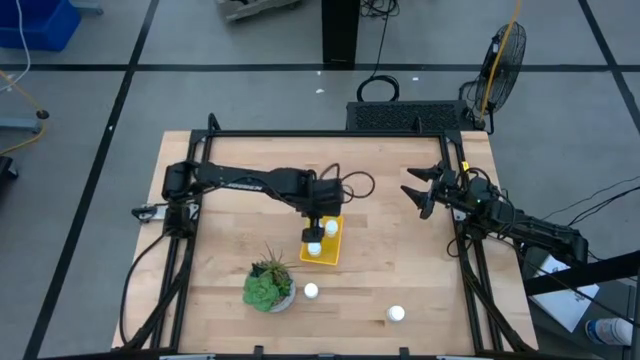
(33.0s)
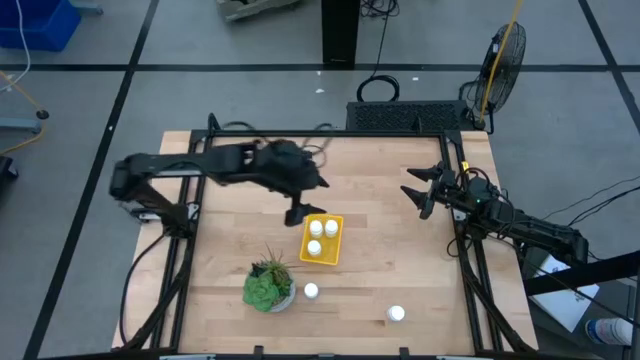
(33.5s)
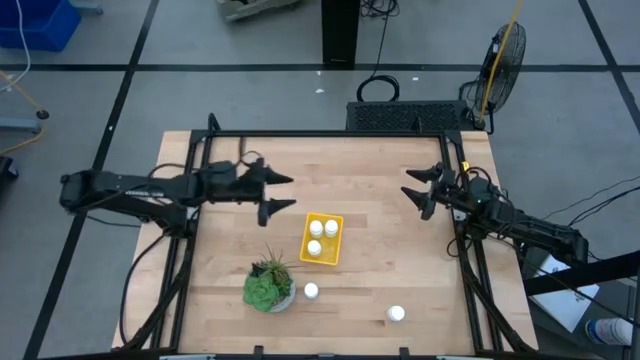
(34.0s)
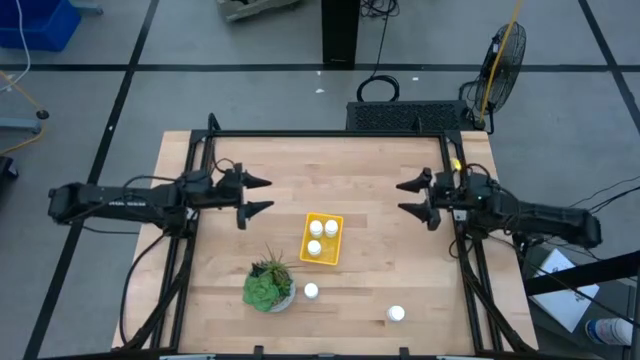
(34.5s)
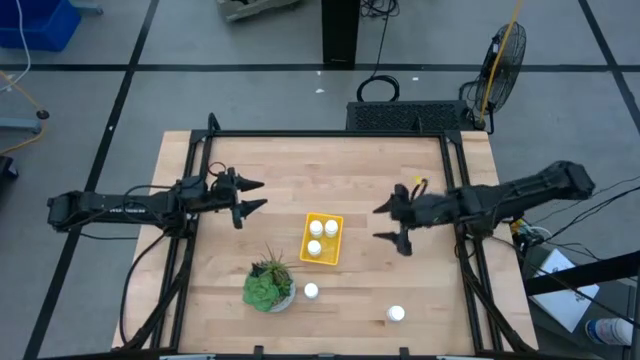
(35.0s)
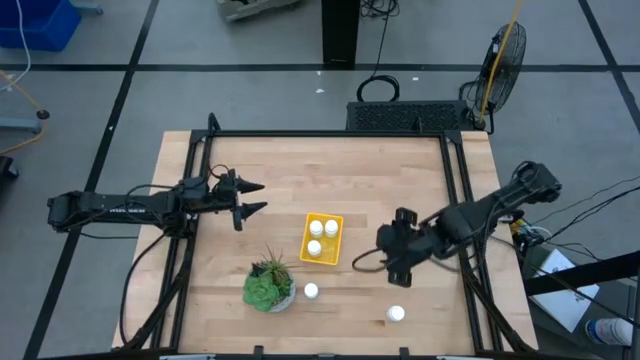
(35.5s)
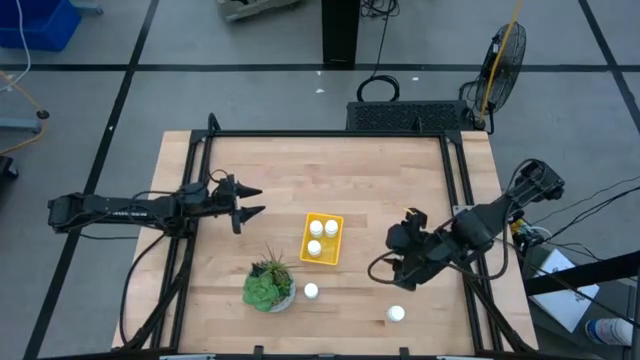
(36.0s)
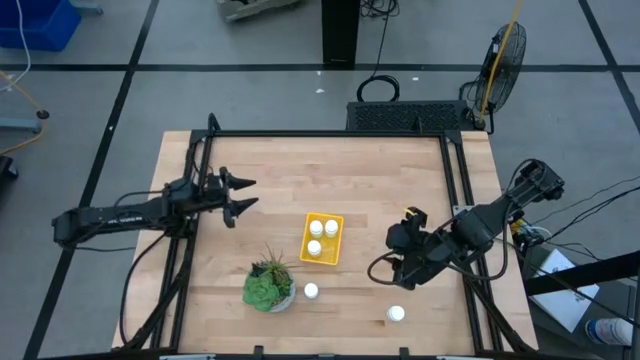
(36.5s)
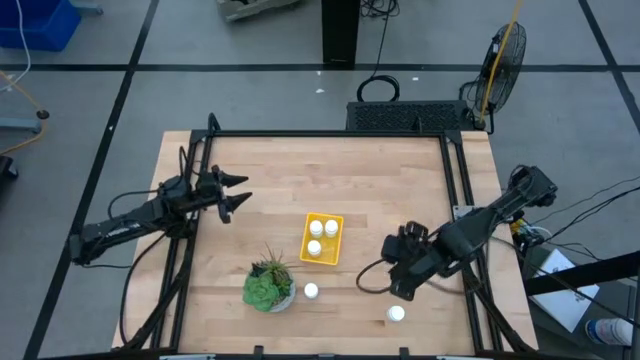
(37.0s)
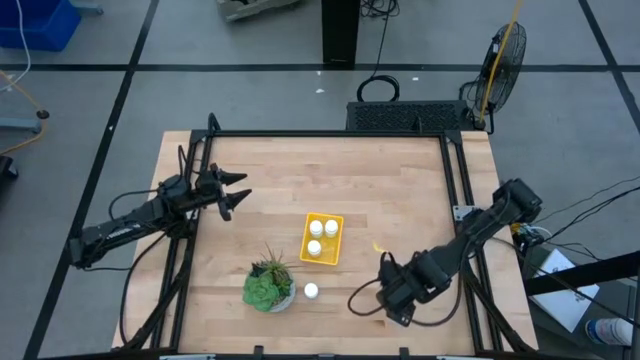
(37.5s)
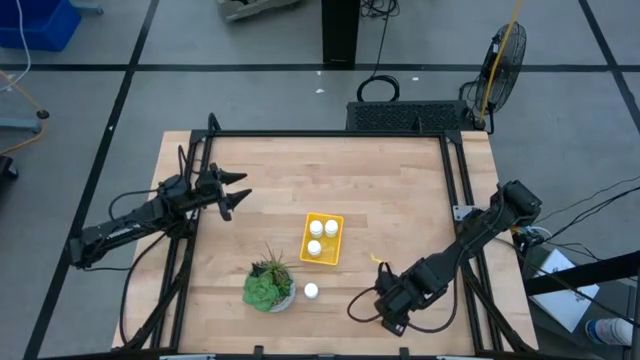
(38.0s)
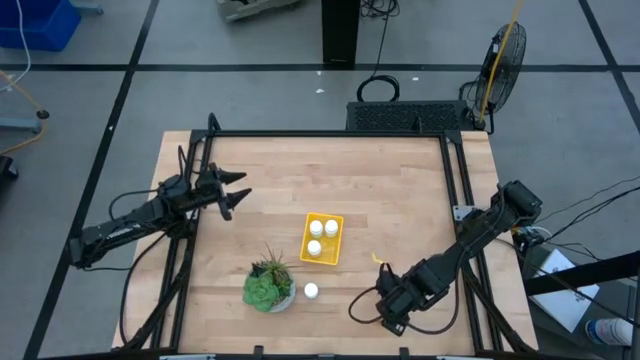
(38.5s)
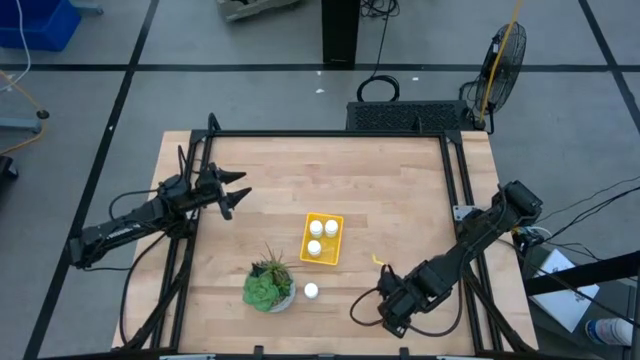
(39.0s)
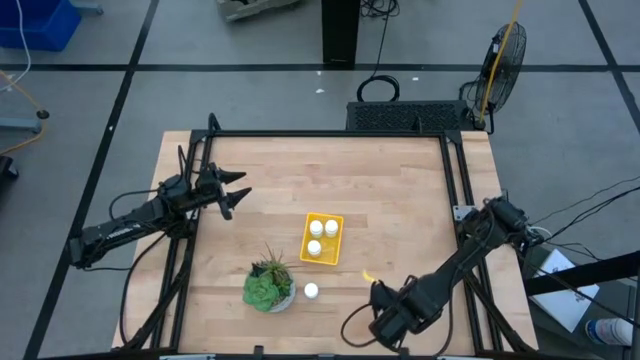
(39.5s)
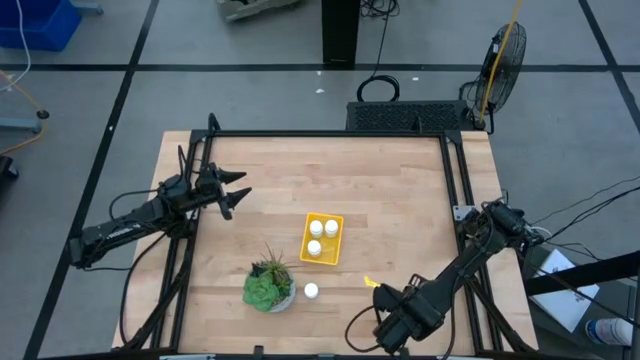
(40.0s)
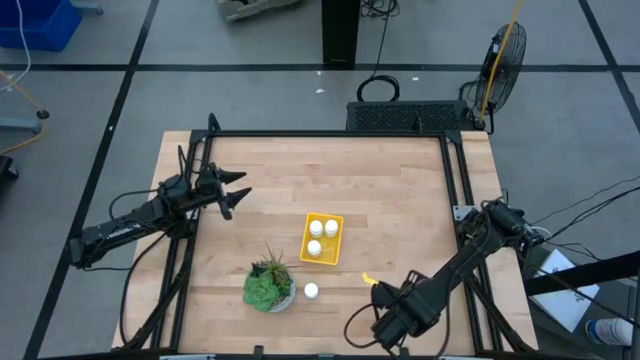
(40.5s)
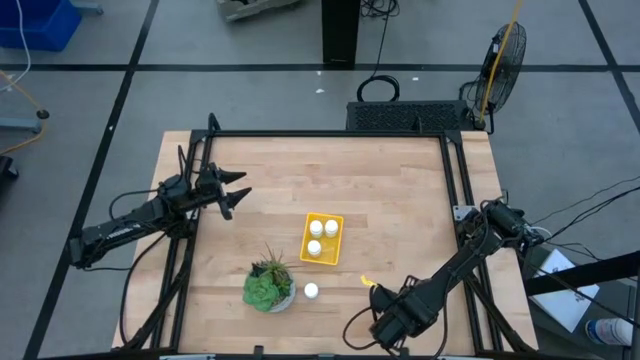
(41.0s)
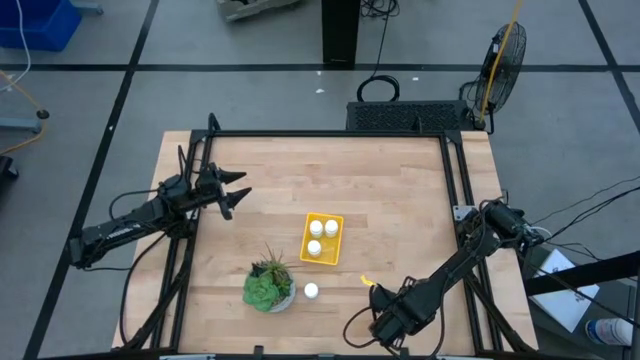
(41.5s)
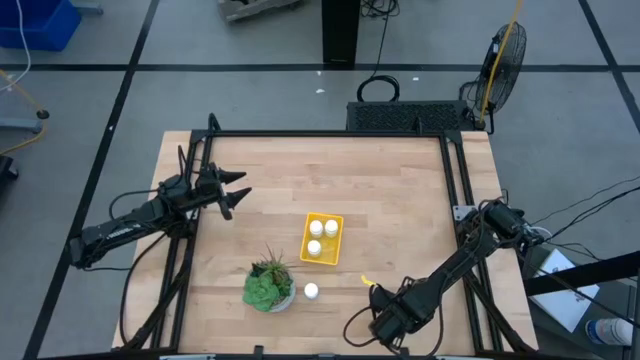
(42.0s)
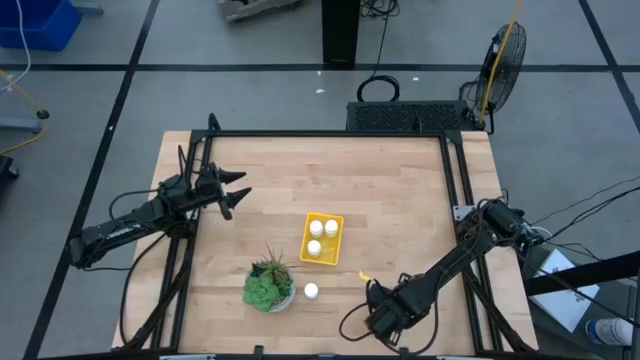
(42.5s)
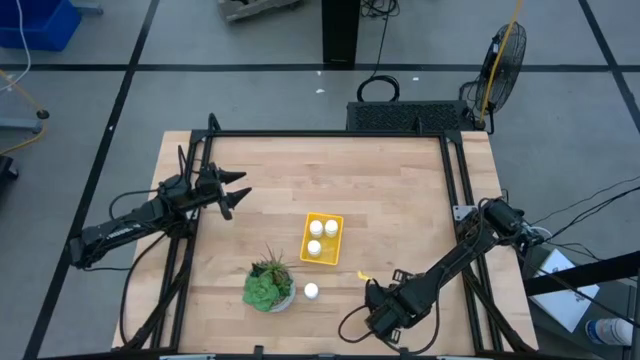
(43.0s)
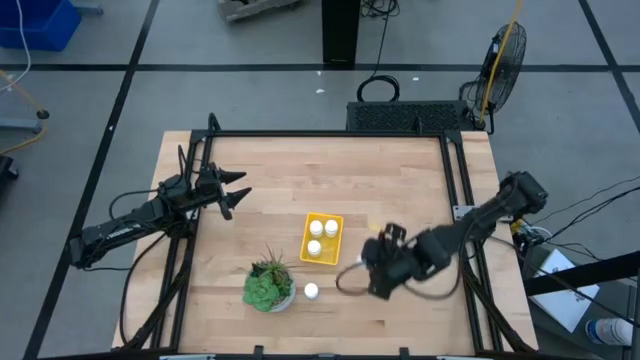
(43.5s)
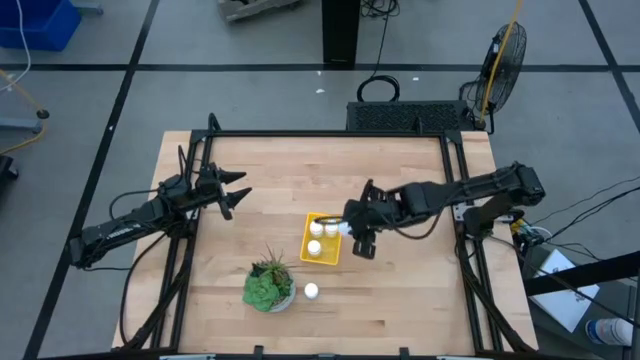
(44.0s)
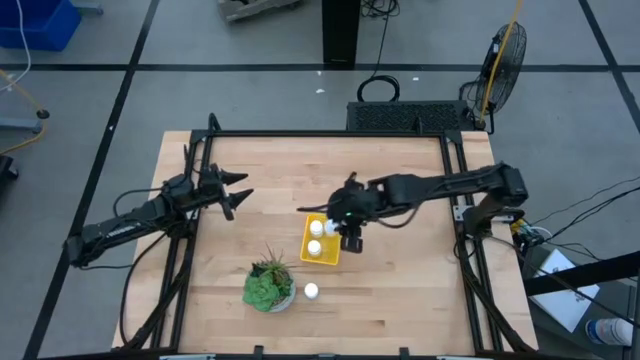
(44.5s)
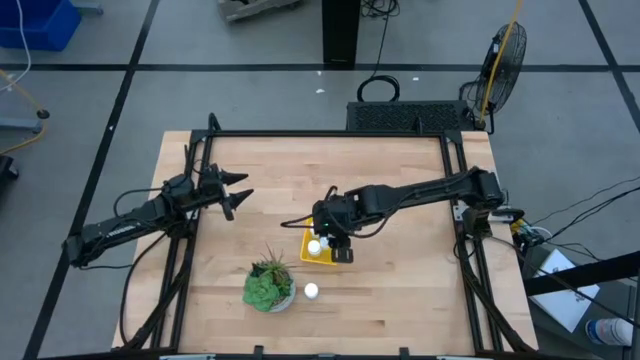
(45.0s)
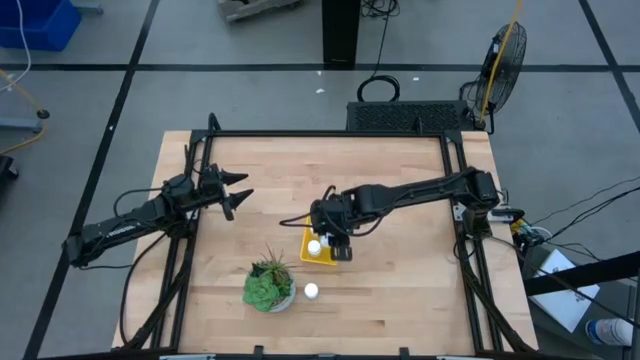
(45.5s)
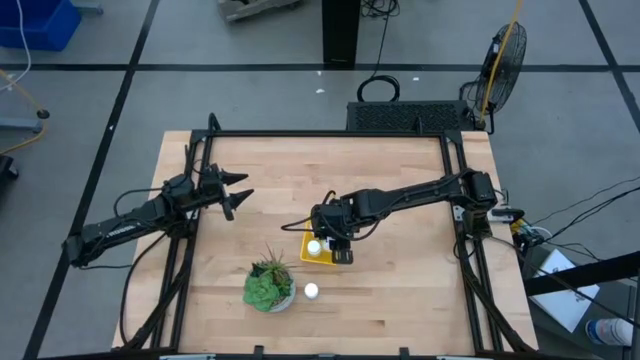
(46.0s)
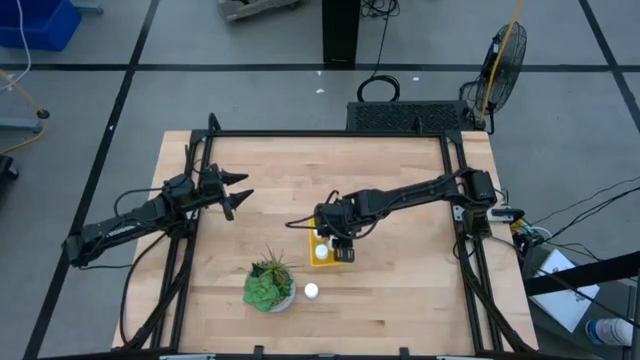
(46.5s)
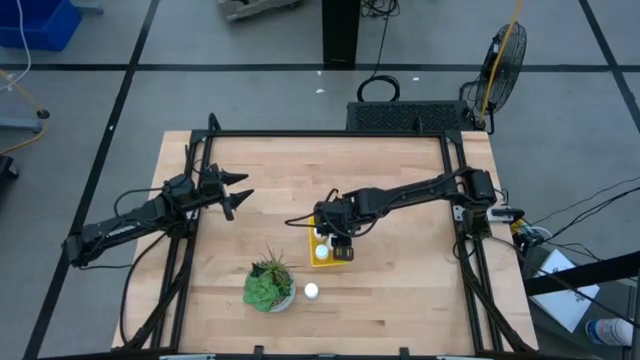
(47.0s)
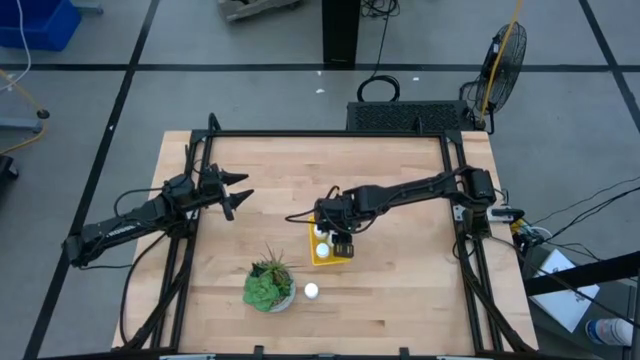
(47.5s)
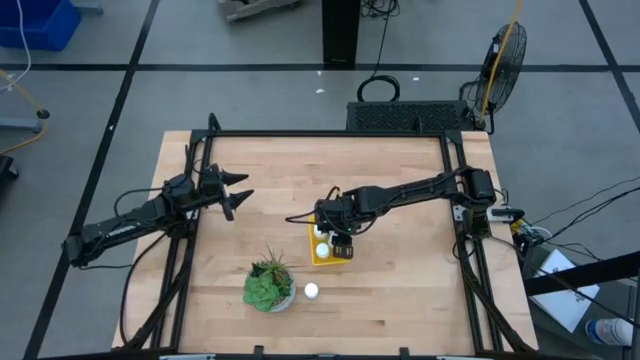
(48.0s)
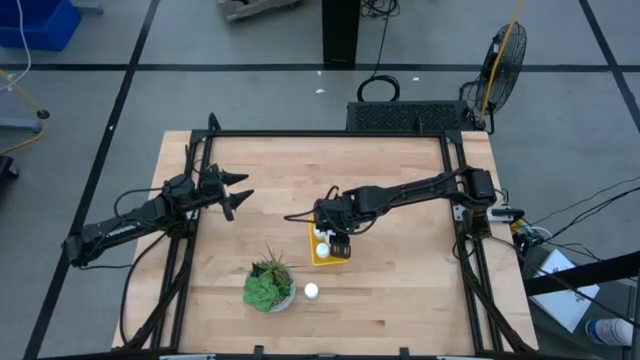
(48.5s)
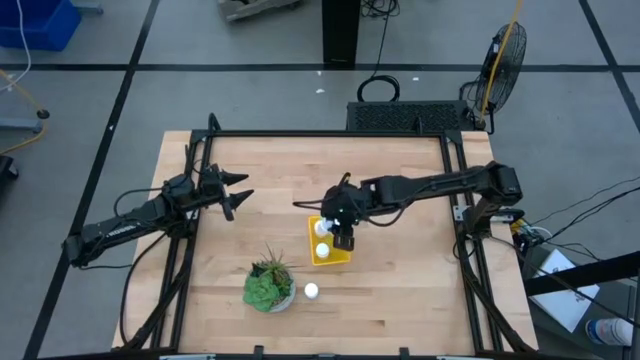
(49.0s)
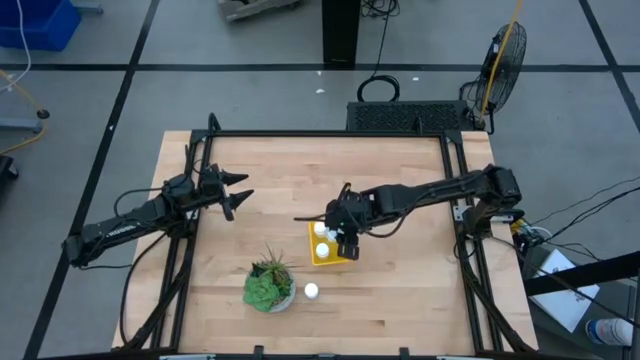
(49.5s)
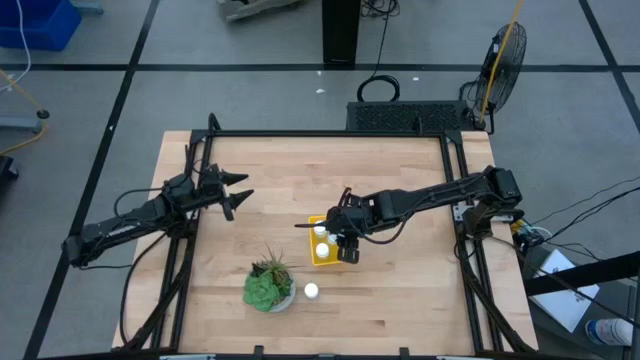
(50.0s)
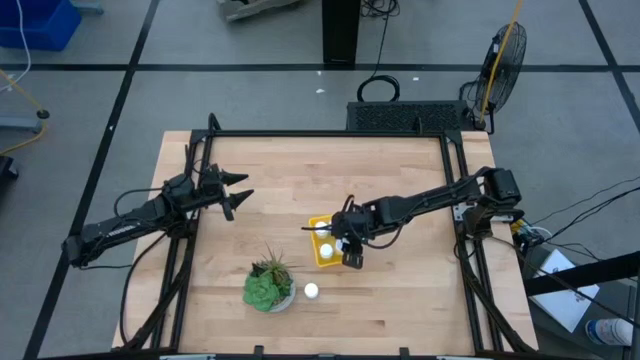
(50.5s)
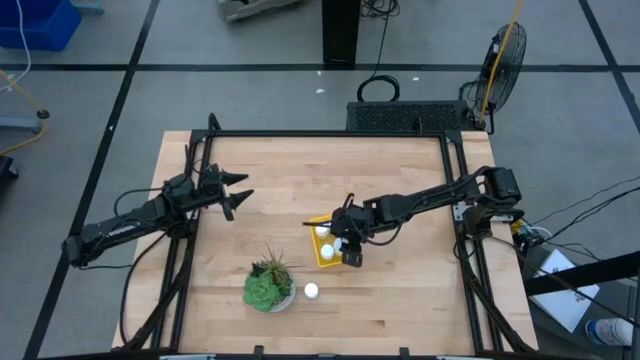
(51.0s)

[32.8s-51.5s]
Task: Pick and place pill bottles into a basket
Put the white pill bottle into the yellow bin

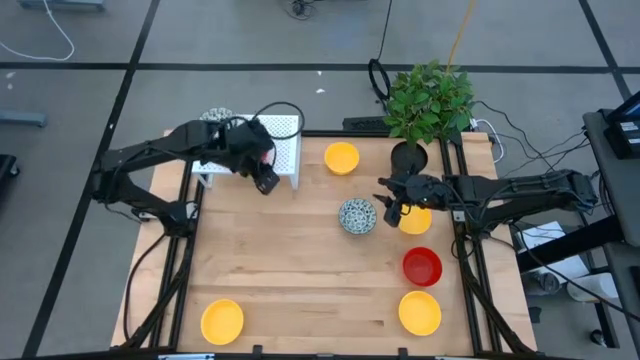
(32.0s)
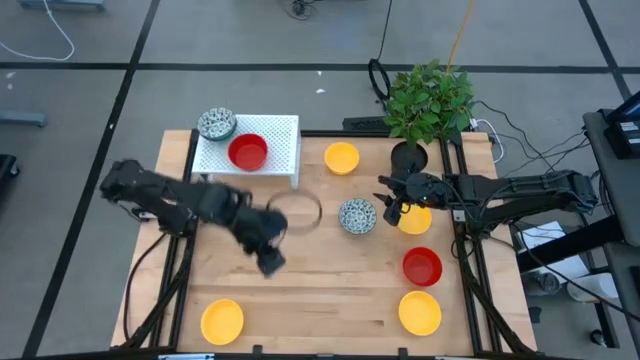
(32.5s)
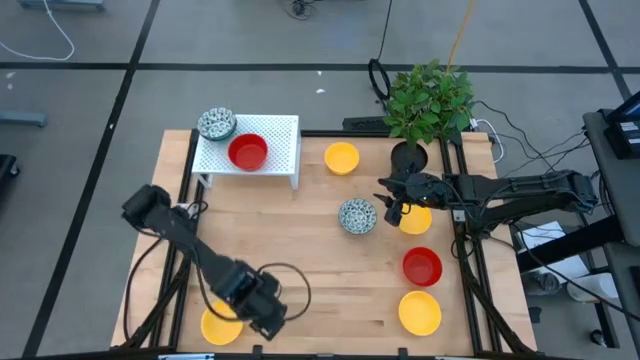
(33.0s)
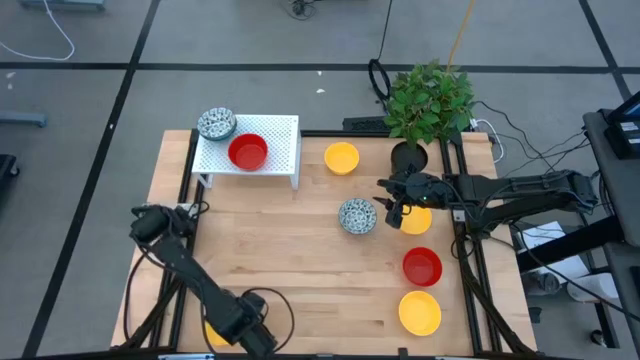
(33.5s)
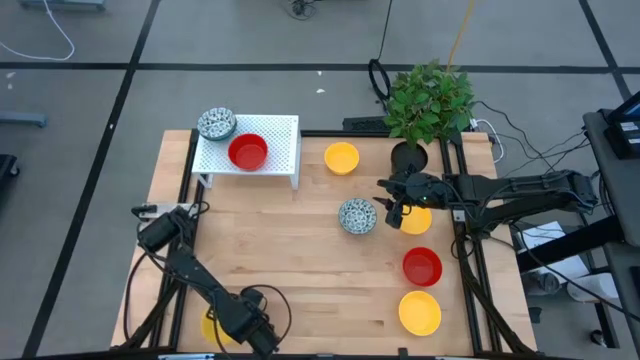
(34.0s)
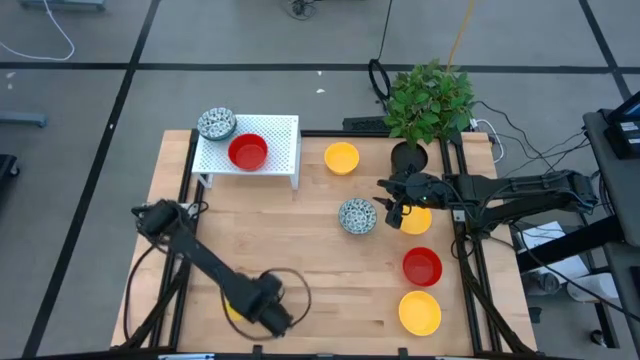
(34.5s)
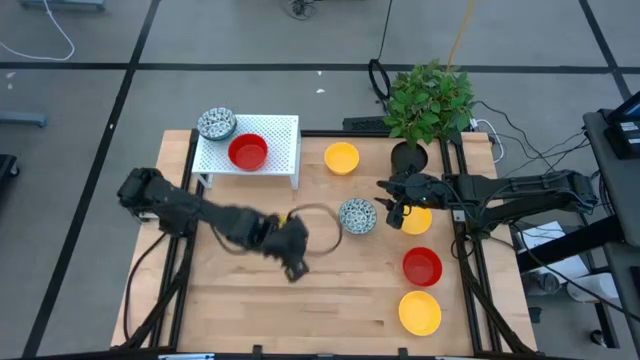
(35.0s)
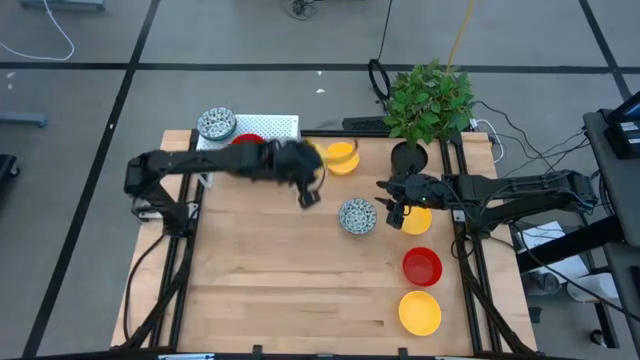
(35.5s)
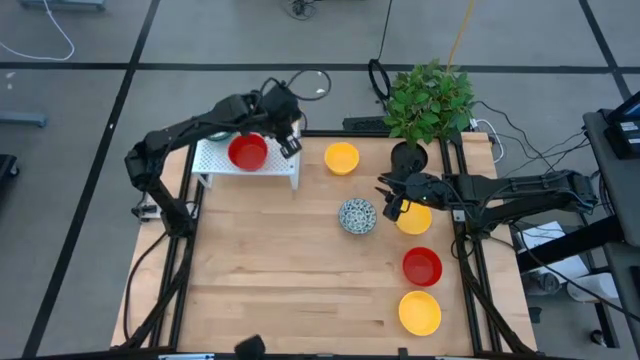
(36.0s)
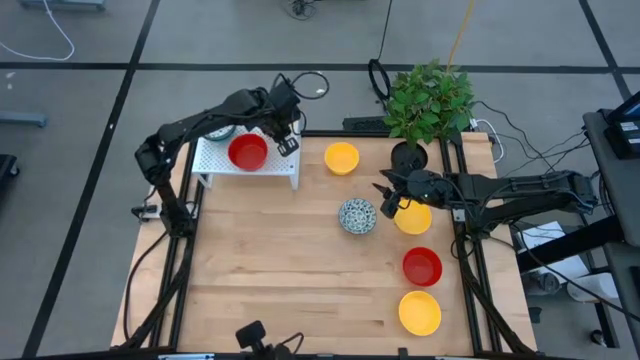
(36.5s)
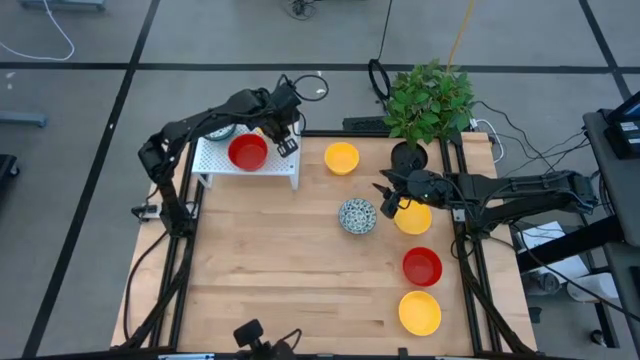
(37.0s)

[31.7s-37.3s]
Task: Pick & Place Mini bowls
Put the yellow bowl on the shelf
